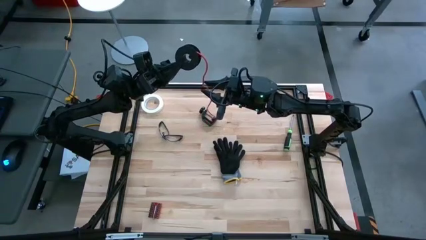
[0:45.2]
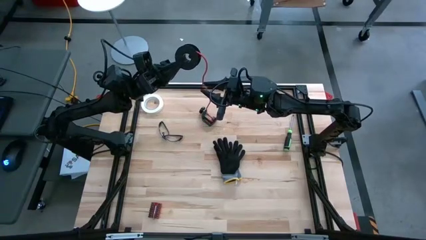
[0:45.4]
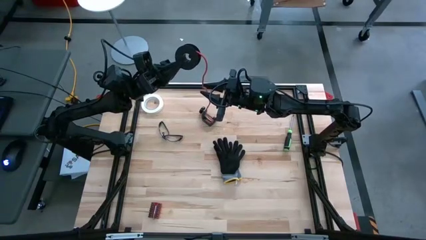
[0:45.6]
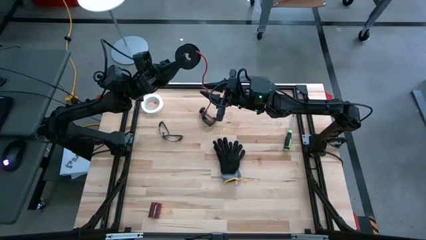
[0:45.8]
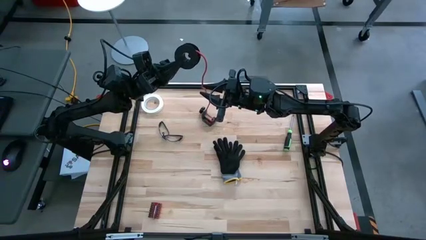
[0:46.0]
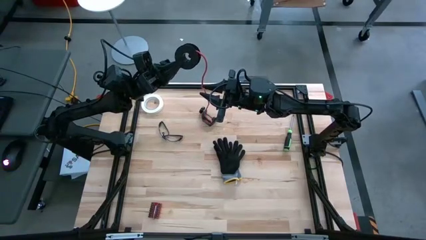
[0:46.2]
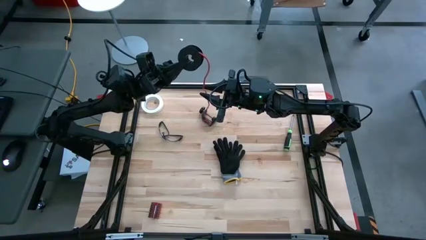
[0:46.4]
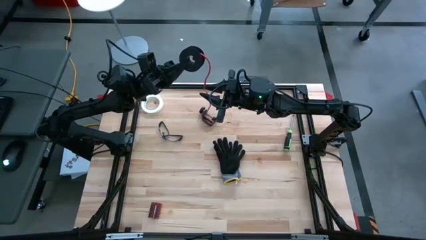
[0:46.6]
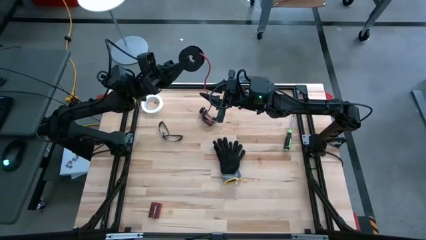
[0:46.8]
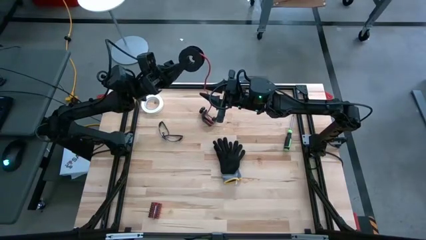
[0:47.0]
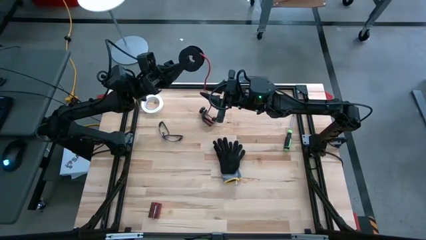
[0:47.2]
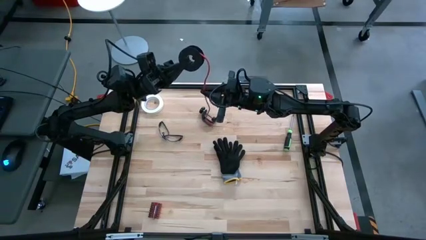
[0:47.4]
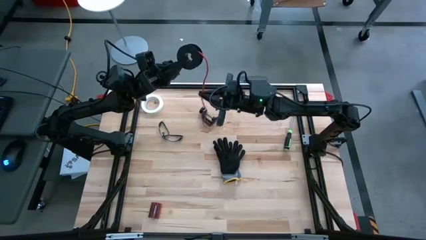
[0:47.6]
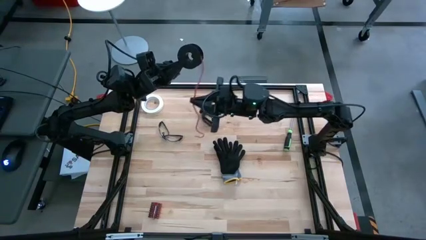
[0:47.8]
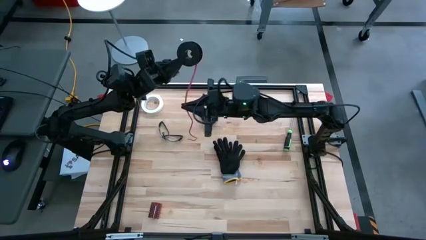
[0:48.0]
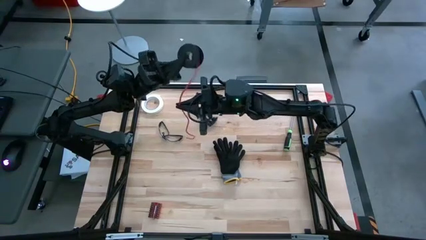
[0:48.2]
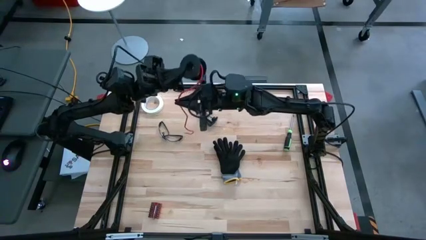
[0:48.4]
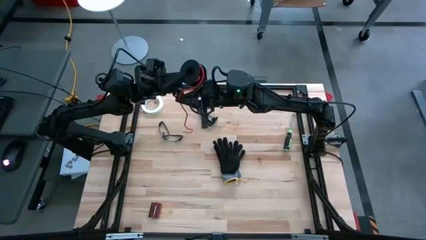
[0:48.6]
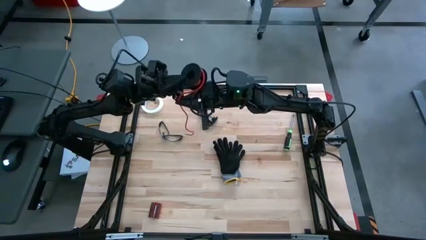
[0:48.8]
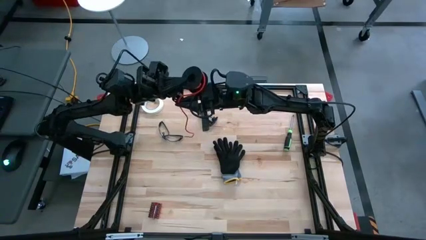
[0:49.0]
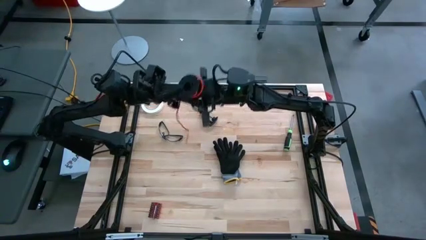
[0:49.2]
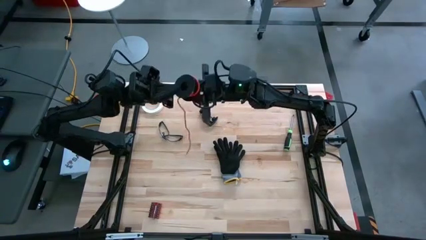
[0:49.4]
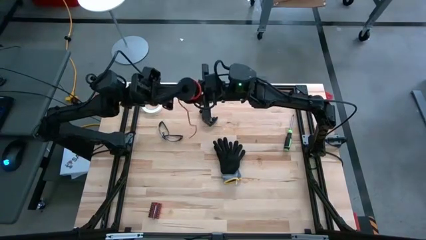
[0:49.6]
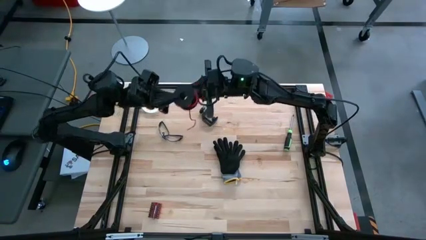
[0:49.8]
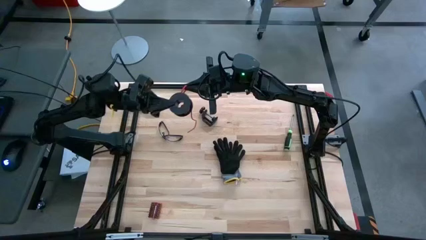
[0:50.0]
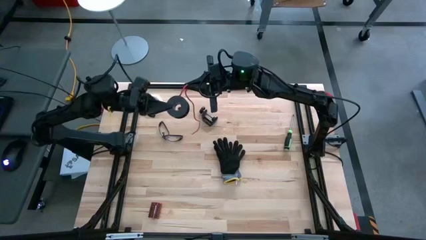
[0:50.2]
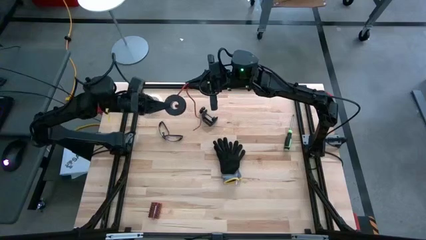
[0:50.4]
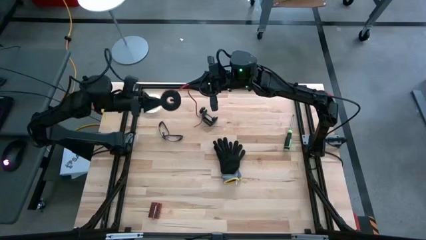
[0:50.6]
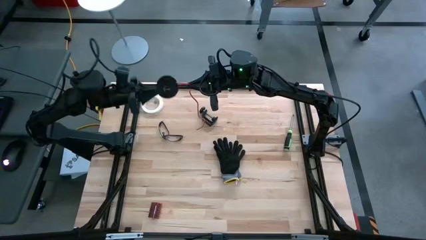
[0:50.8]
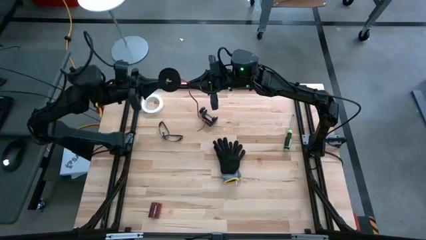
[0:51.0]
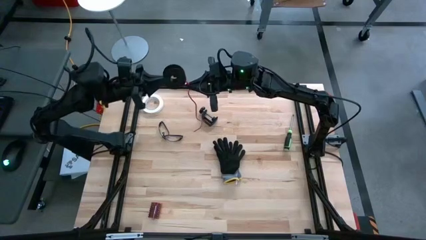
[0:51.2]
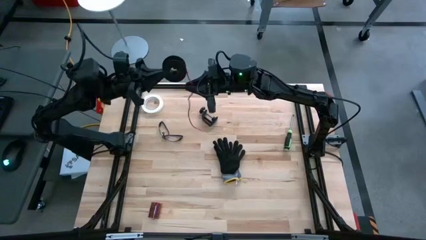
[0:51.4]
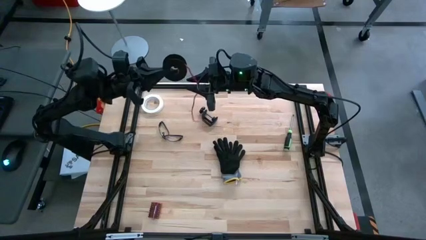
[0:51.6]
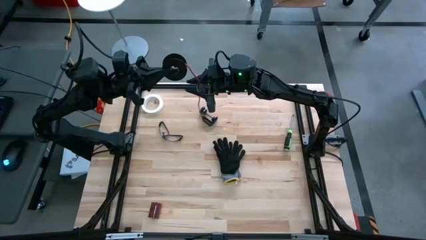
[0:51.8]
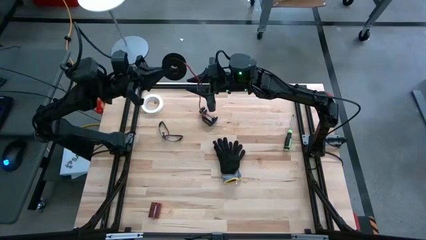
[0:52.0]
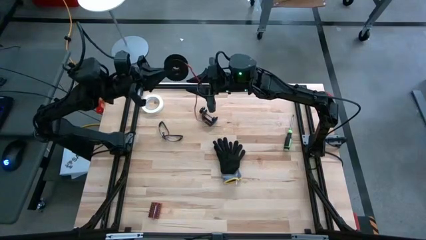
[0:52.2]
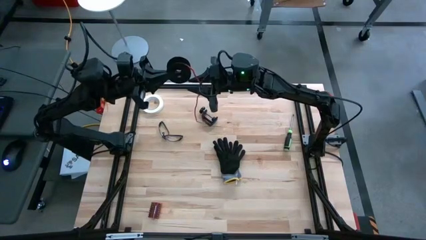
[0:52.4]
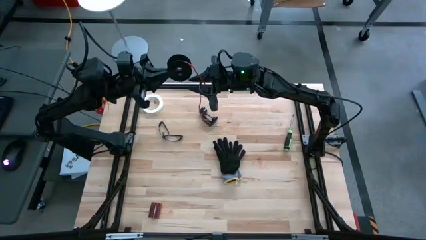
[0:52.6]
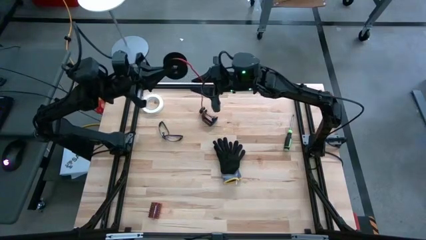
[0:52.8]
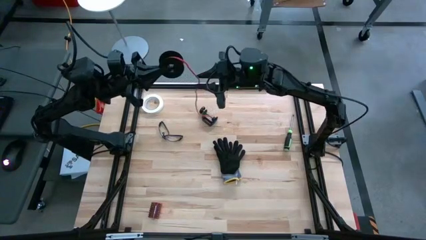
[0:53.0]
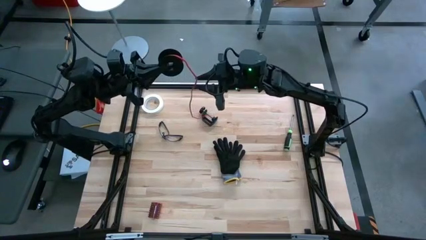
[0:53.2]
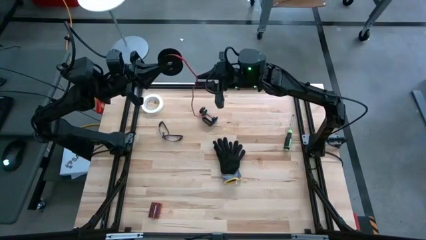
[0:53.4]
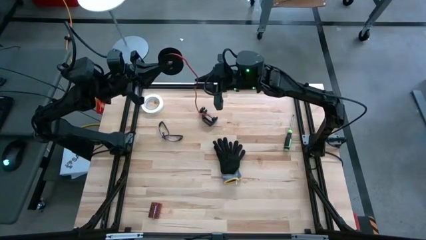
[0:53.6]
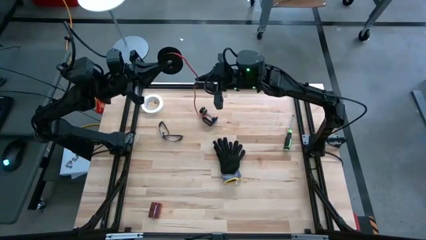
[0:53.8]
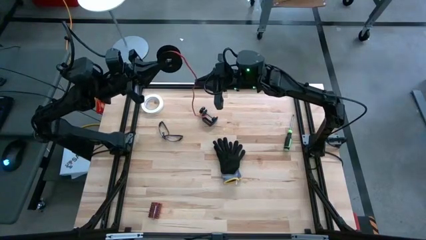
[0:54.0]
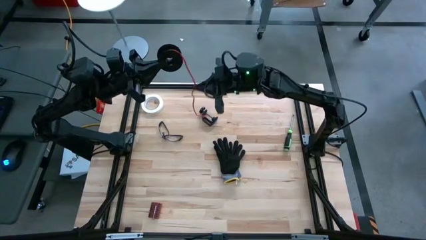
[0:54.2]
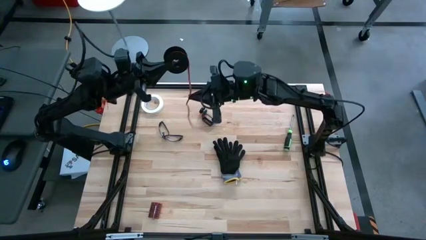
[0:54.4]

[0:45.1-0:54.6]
Task: Coil cords
Coil the orange wire onto the spool

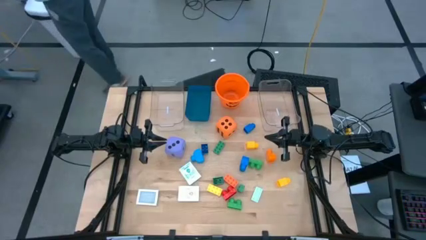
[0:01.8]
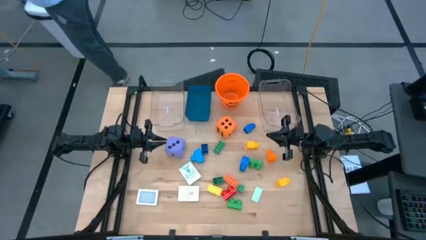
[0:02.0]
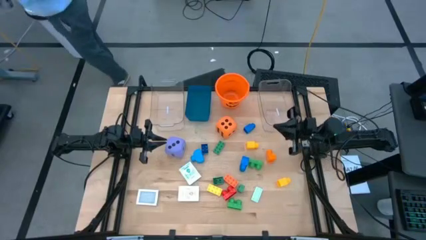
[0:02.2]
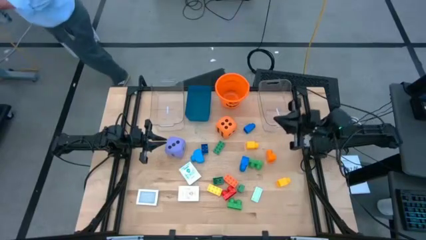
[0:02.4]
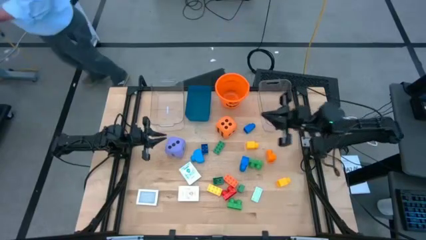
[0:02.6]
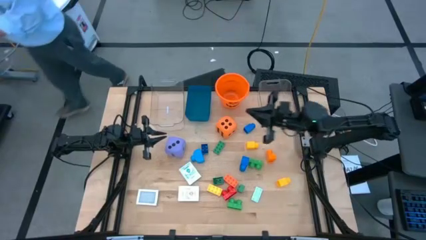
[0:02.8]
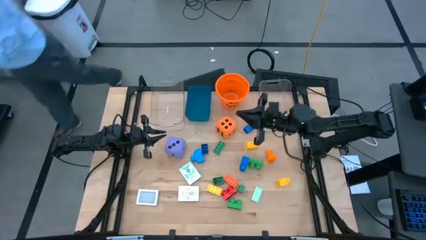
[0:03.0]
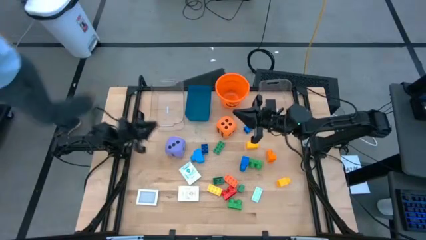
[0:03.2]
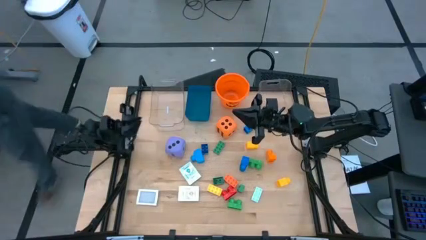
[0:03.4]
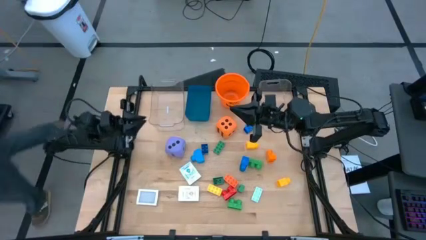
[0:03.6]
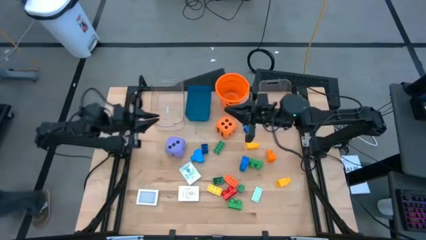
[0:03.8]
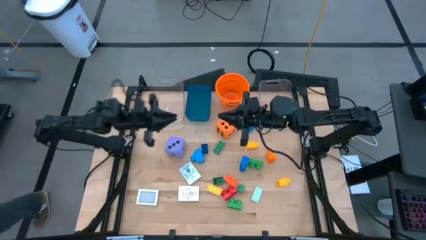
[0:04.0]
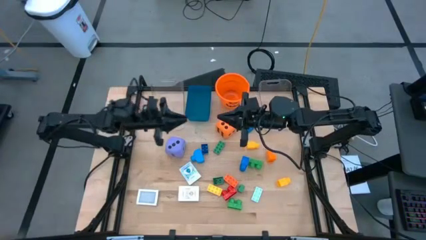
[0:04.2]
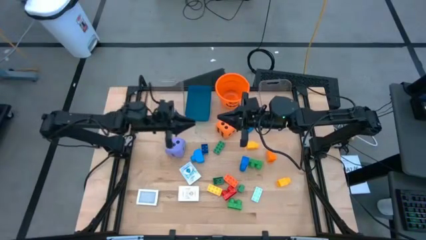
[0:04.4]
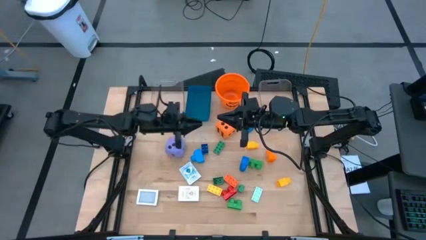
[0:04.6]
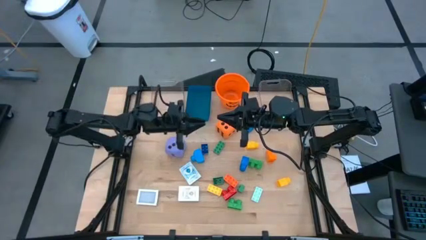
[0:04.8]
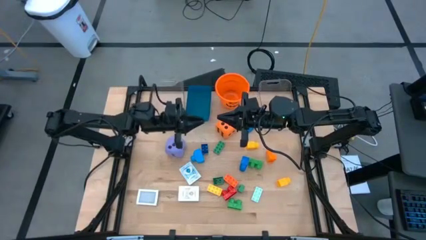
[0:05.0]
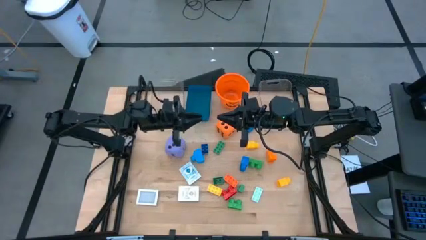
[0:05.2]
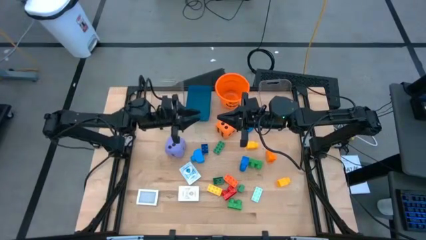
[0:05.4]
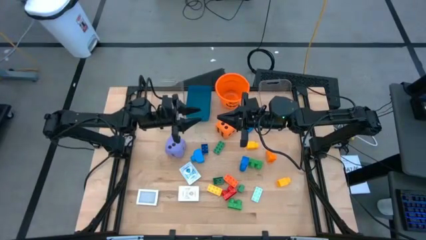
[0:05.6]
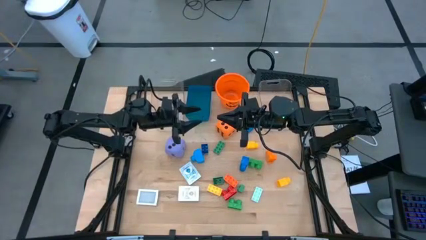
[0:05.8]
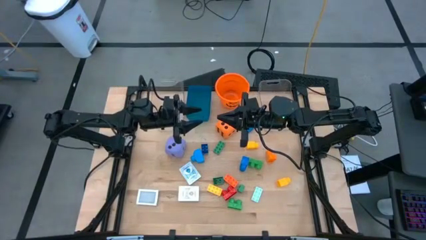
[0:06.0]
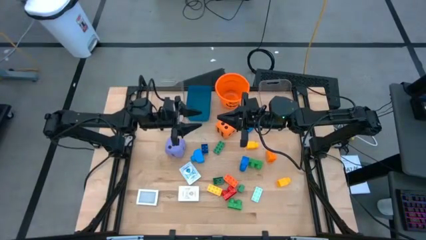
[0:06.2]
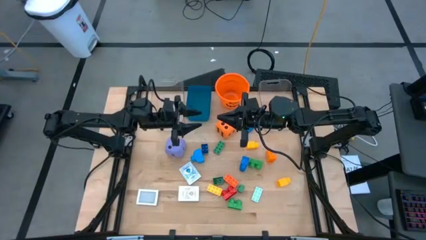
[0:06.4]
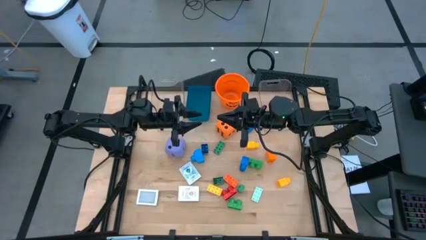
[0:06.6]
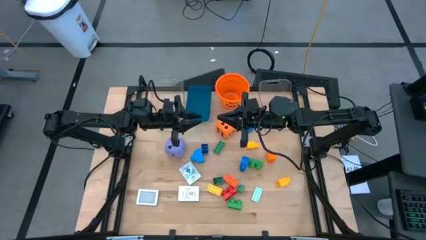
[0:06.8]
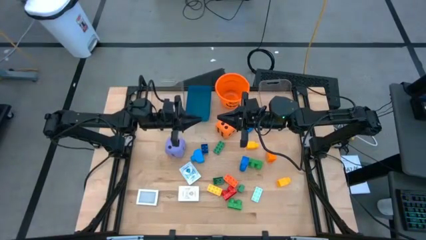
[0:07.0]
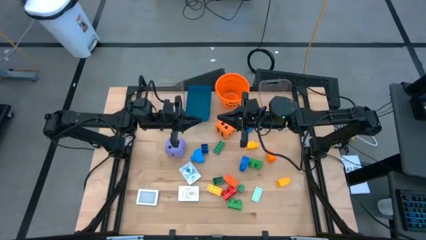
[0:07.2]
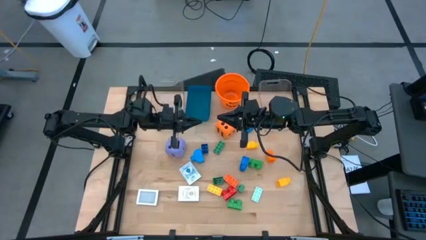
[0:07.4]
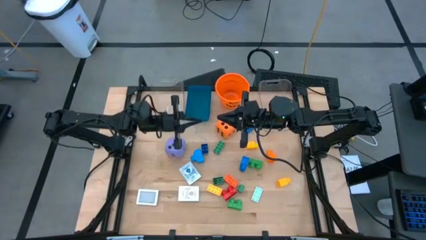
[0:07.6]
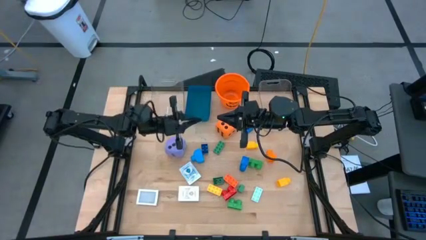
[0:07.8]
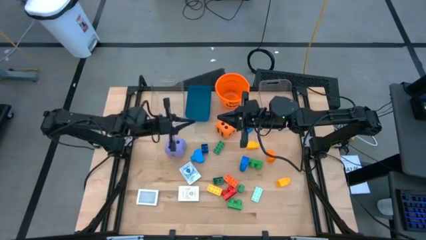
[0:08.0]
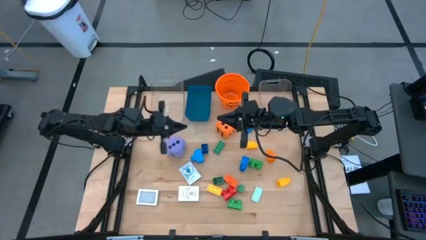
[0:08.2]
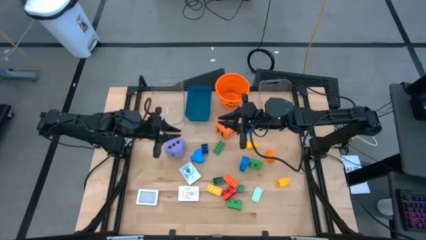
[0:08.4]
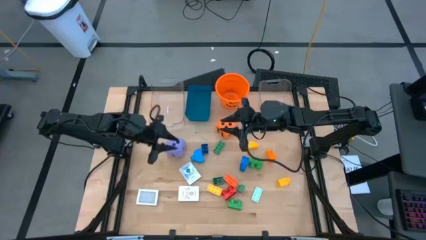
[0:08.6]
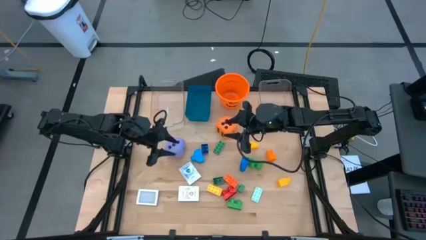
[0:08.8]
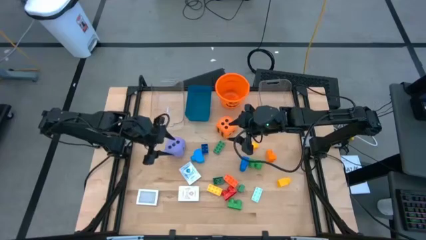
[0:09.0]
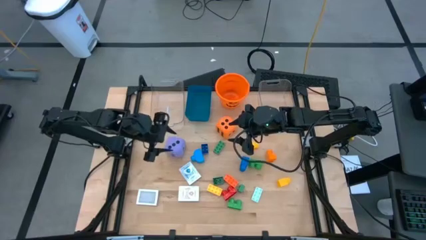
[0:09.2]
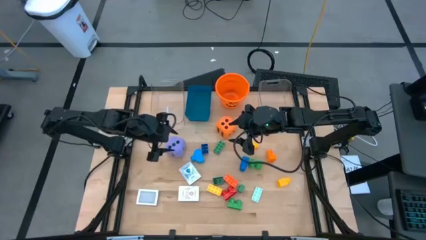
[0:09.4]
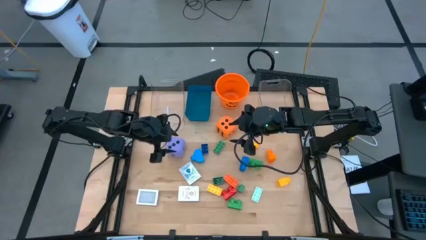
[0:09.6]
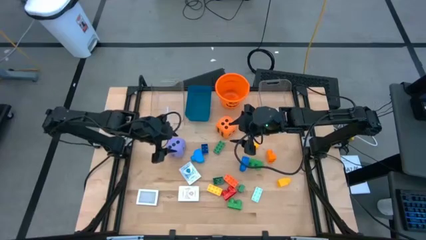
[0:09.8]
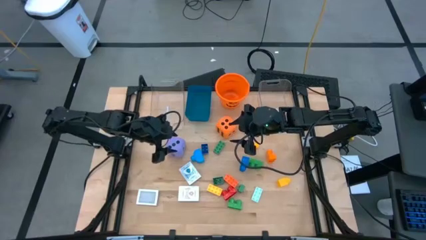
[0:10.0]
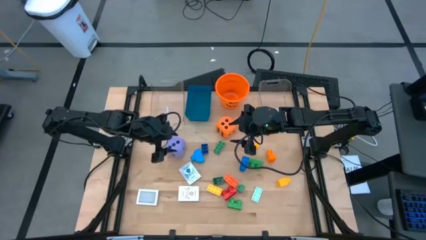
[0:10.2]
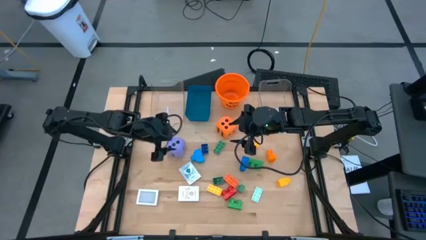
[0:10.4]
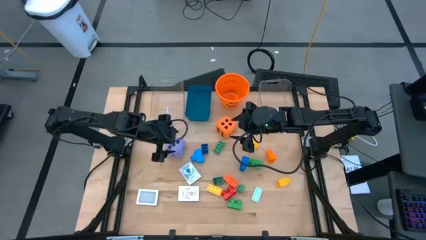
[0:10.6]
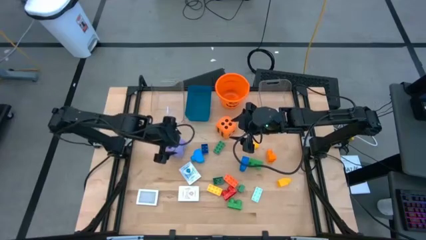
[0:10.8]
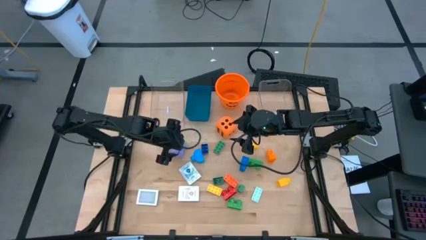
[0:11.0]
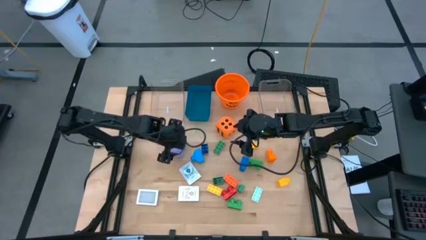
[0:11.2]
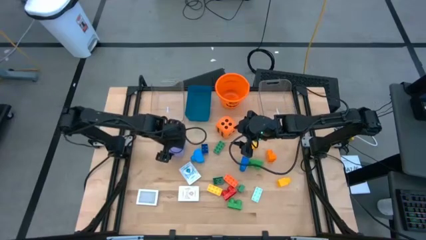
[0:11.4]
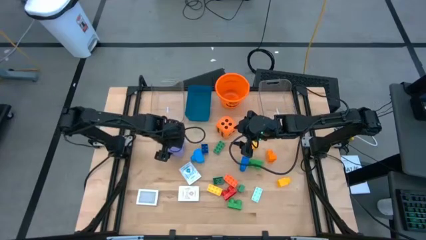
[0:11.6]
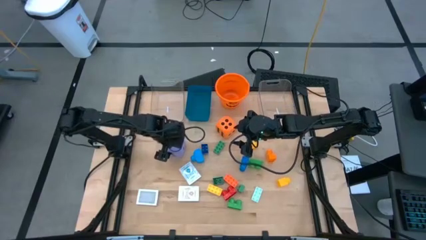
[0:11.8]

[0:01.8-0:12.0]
Task: Pick & Place Toys
Put the violet dice into the left transparent bin
